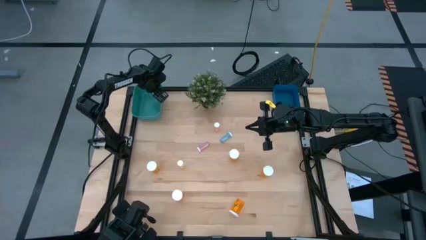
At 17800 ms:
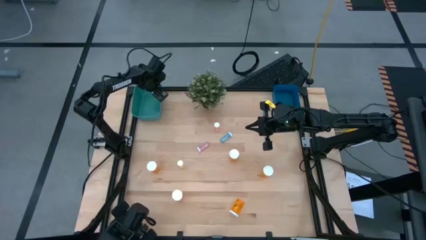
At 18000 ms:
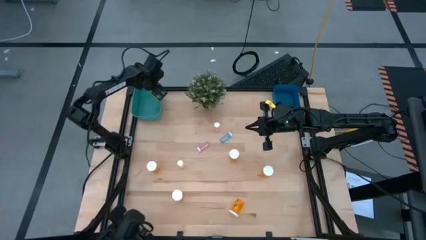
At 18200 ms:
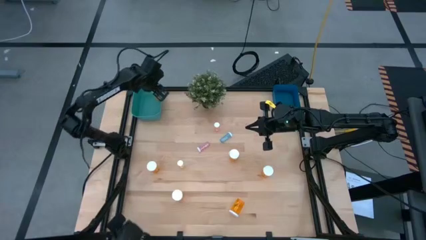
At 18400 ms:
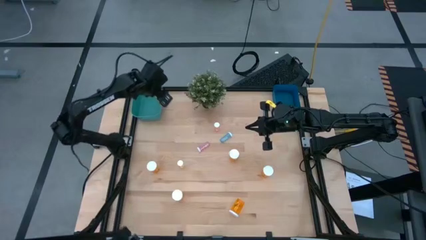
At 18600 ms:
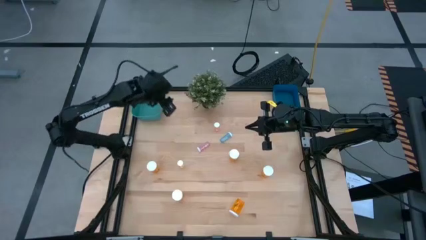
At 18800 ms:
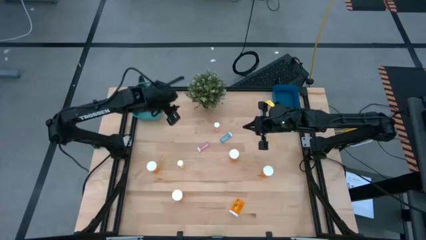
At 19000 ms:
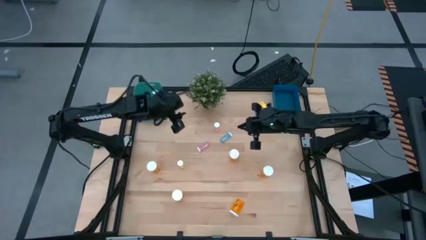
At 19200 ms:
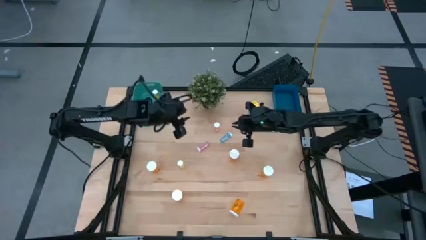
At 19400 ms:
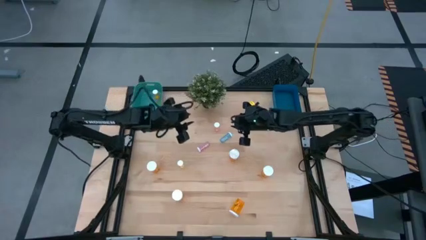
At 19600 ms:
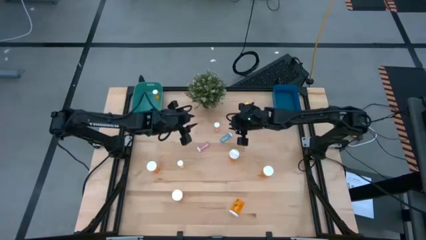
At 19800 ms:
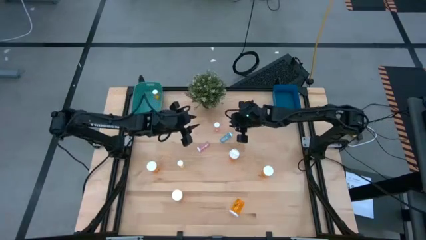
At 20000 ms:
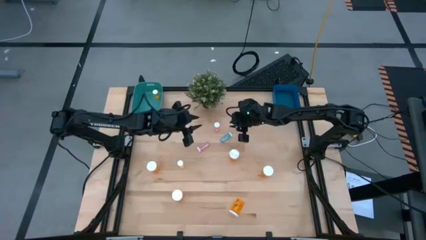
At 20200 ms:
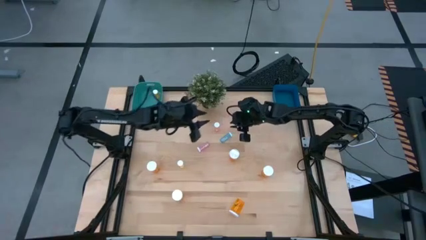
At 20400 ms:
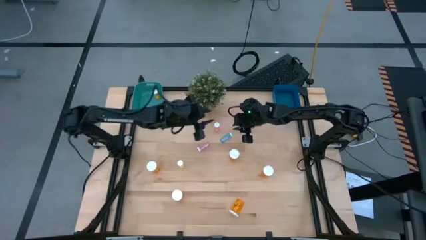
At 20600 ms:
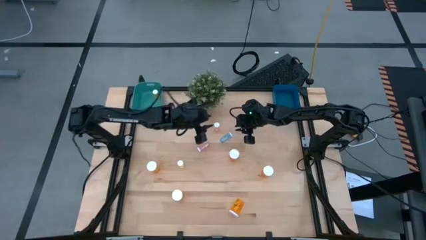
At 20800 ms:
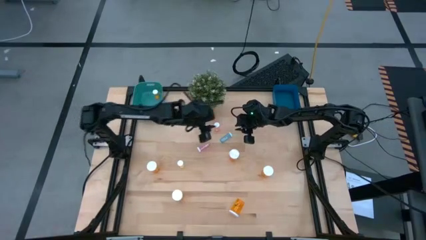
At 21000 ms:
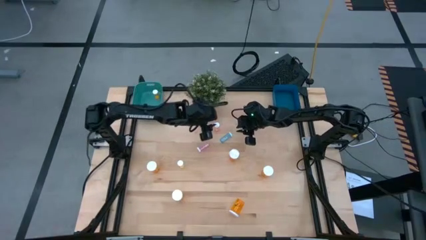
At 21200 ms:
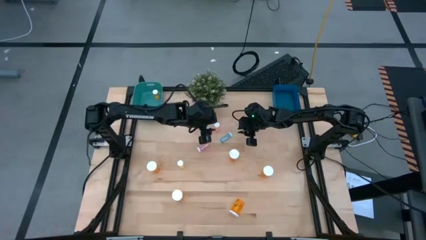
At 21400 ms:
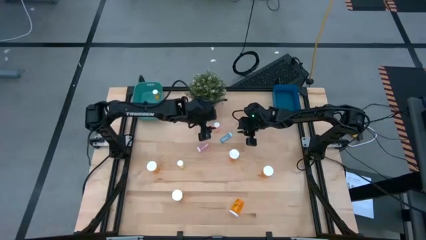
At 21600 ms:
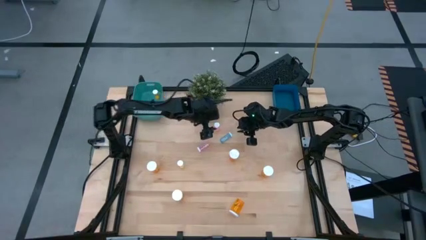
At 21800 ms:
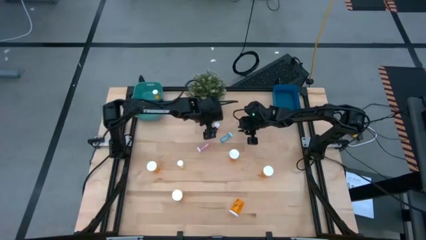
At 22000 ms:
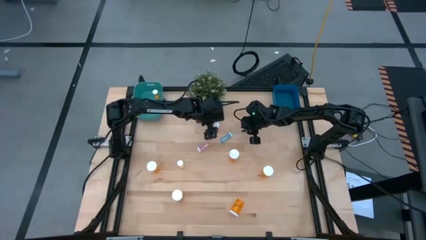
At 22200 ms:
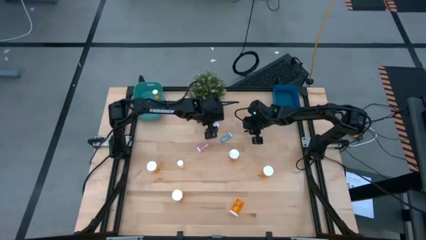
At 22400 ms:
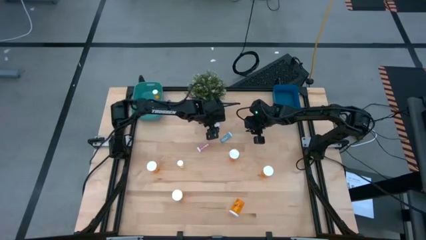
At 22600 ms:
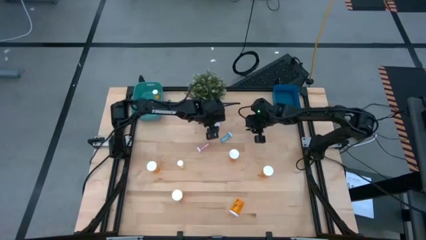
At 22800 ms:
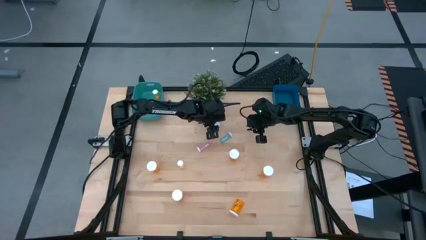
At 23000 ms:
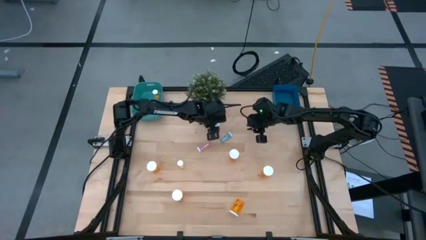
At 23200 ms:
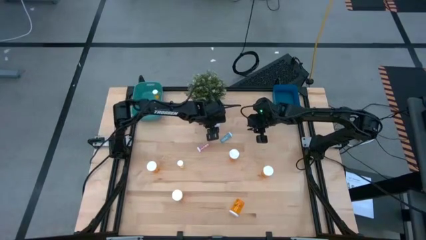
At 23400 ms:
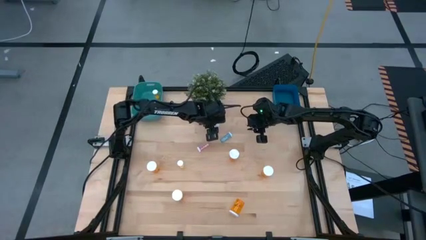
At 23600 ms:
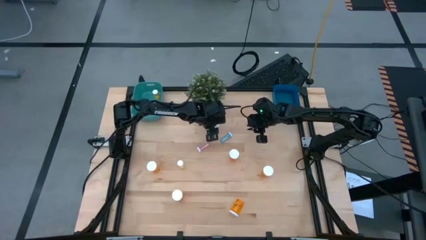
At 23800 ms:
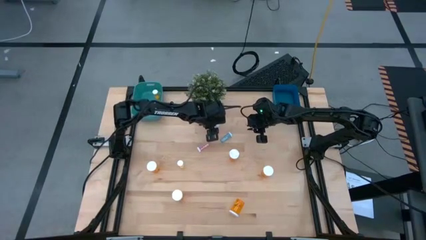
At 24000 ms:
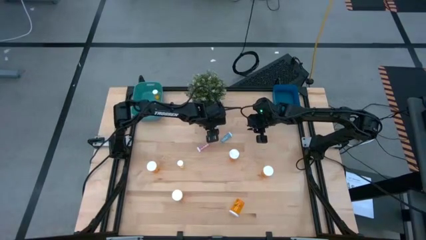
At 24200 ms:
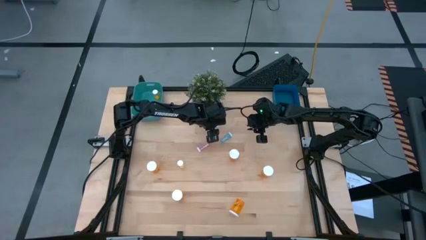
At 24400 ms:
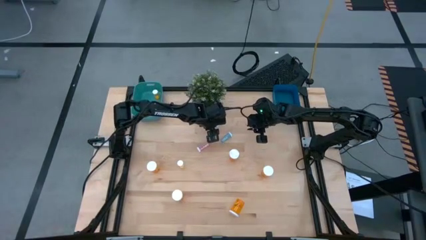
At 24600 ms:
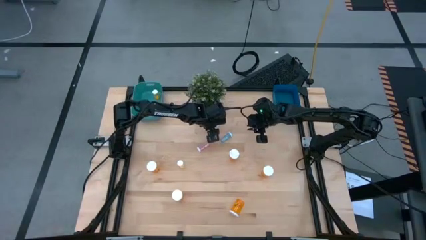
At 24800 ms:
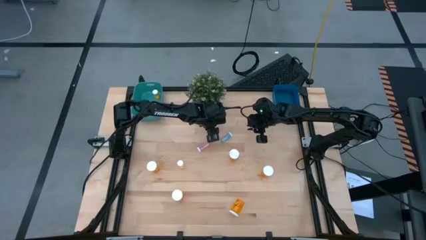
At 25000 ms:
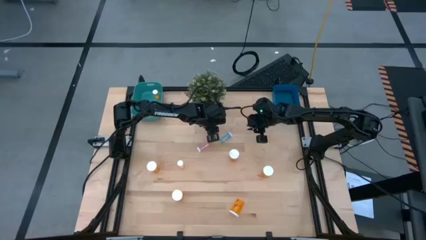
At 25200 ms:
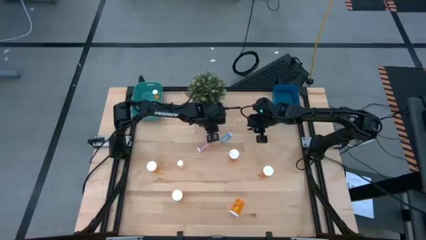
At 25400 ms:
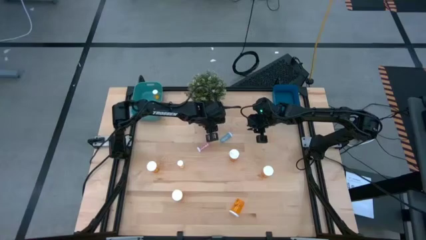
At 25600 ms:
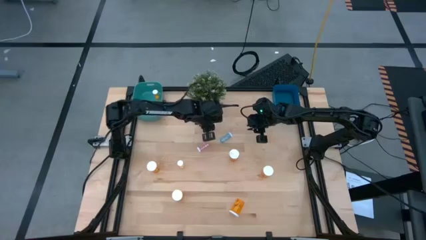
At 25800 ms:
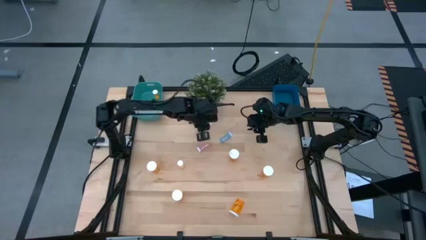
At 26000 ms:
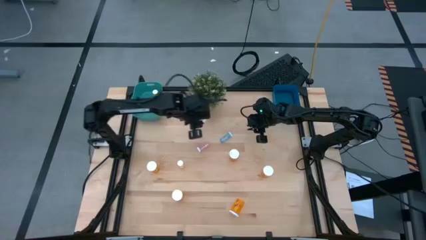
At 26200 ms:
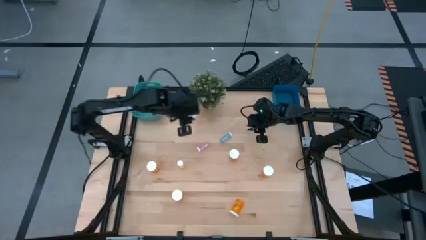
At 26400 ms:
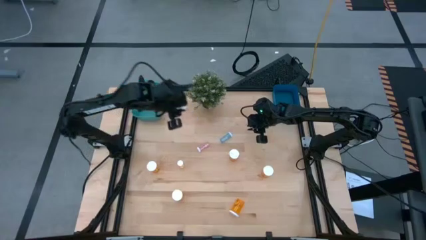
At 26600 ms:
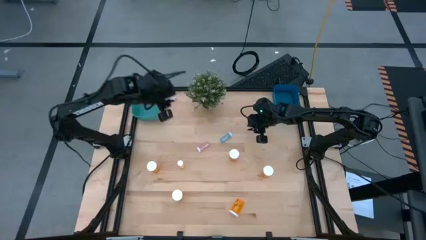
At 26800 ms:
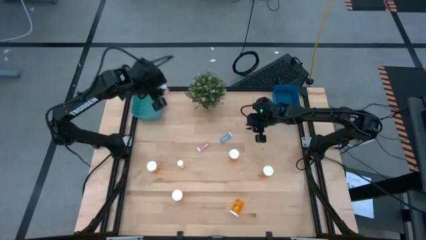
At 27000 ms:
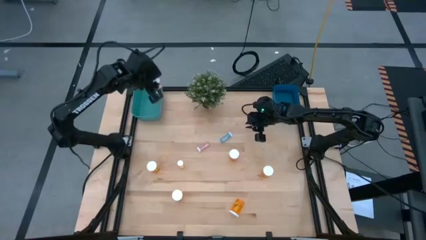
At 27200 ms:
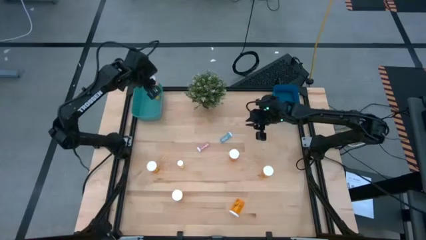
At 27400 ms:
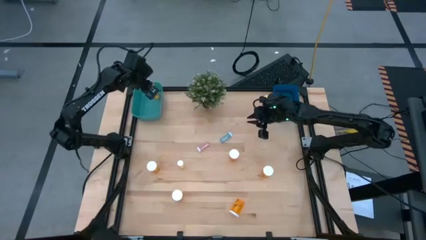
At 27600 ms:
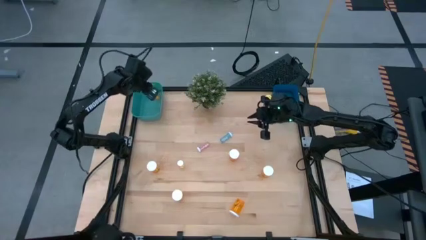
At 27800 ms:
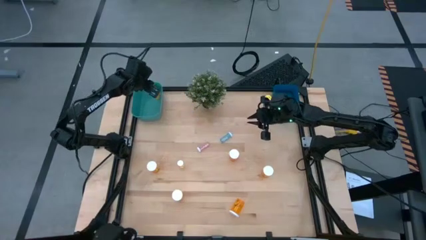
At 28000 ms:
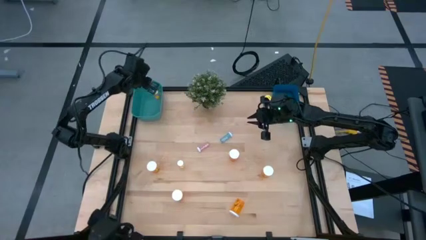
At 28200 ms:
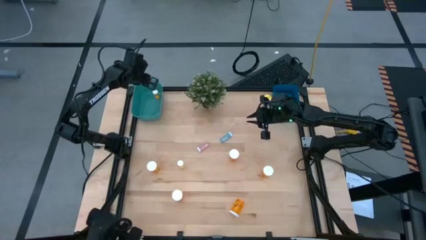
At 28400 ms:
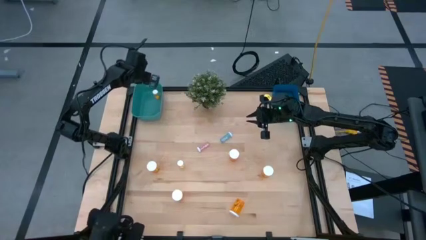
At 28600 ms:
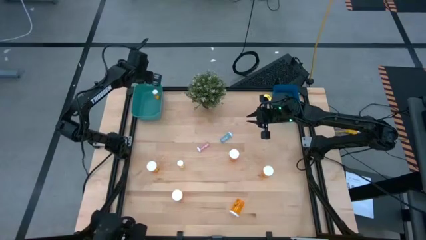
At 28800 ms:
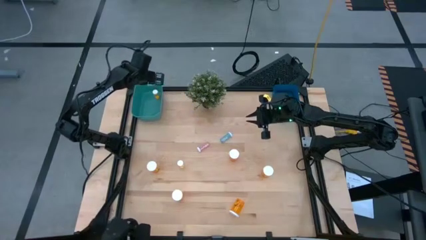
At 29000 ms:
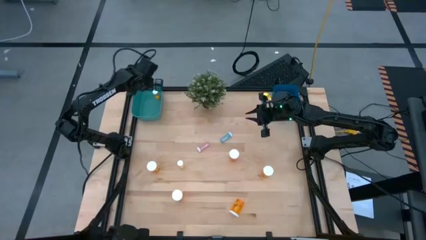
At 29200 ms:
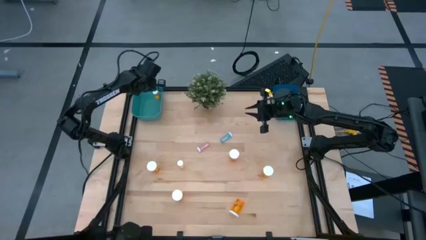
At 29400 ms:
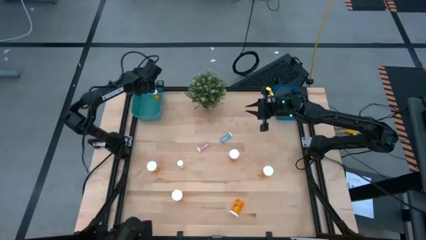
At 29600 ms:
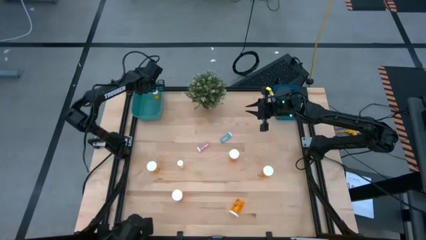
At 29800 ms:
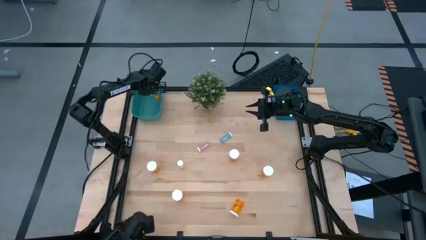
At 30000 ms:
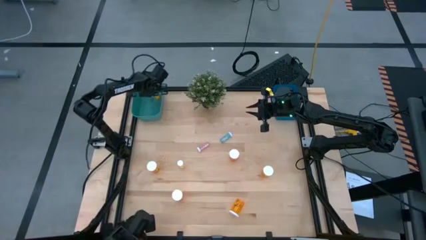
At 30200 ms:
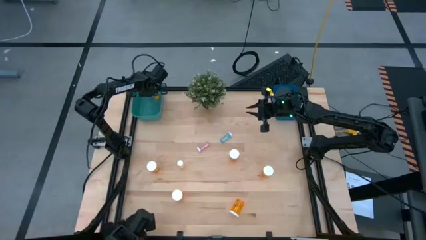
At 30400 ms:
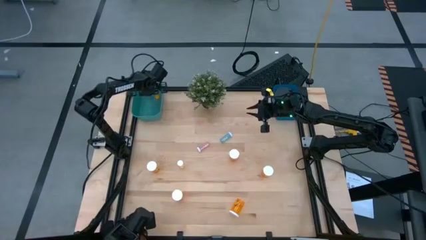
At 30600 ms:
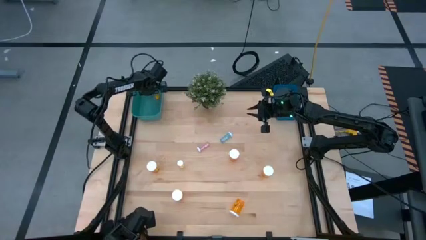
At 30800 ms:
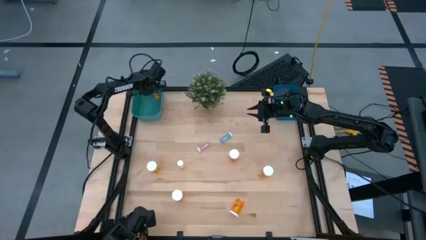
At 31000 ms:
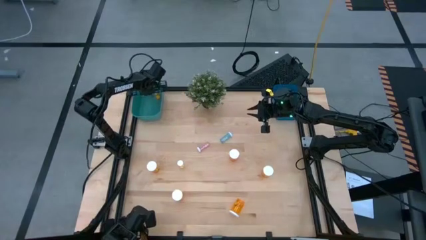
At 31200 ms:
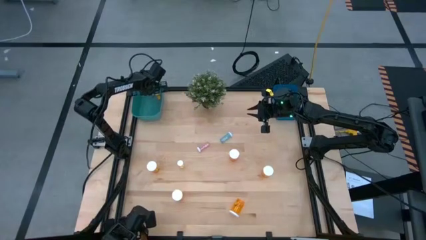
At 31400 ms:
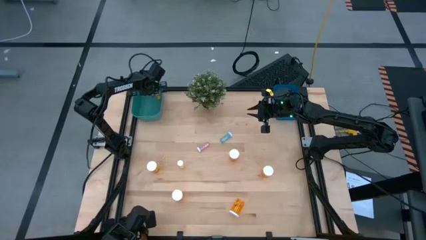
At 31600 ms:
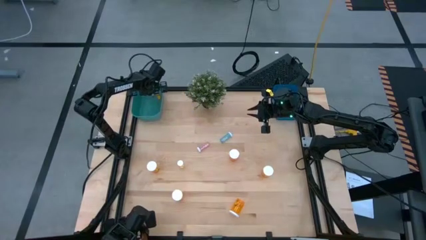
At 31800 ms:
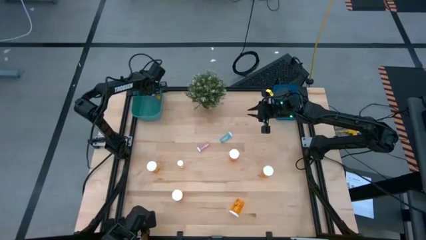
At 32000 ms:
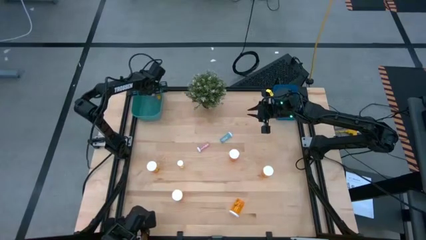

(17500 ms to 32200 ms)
Task: Pick and place medicine bottles into bin by pill shape (circle, oval)
Put the top pink pill bottle into the green bin
